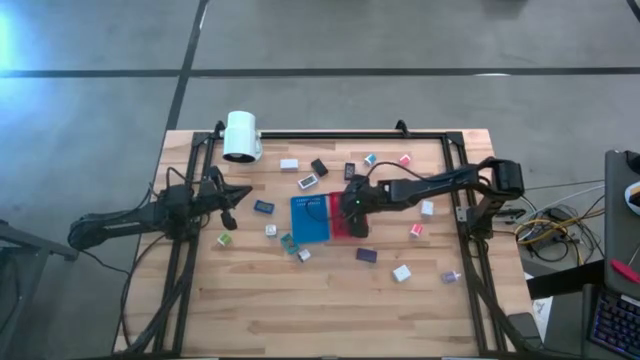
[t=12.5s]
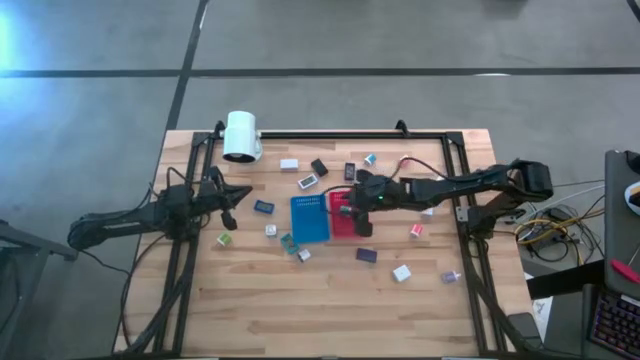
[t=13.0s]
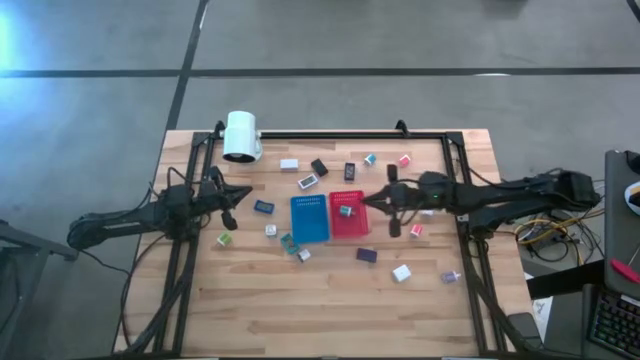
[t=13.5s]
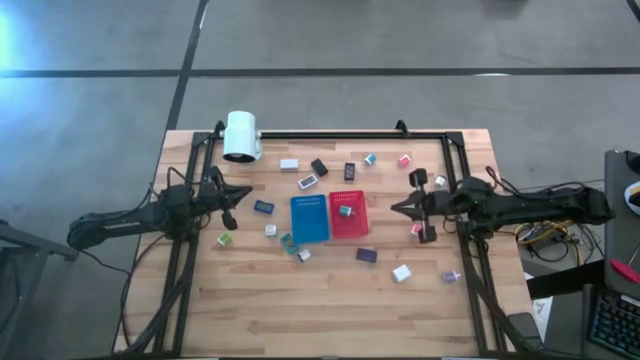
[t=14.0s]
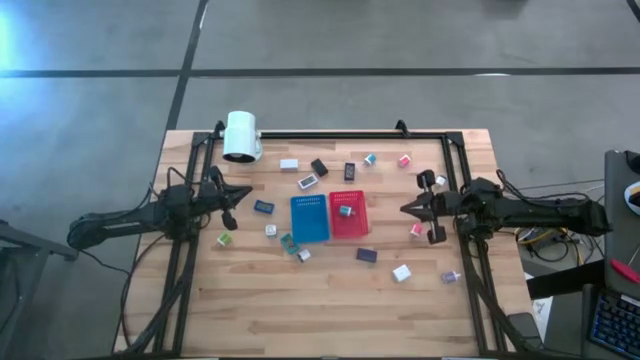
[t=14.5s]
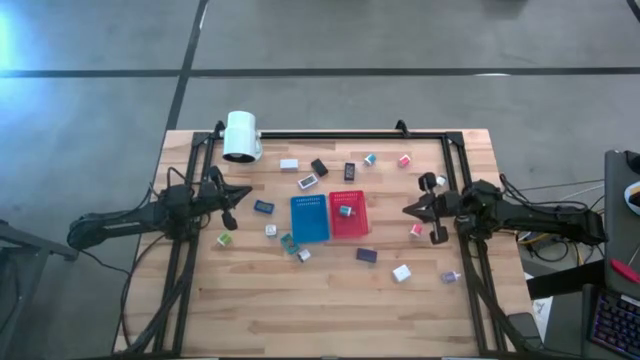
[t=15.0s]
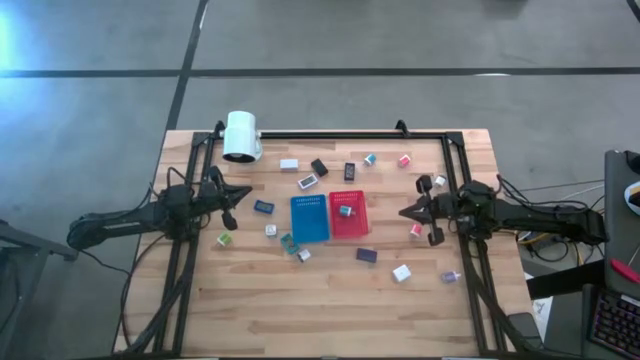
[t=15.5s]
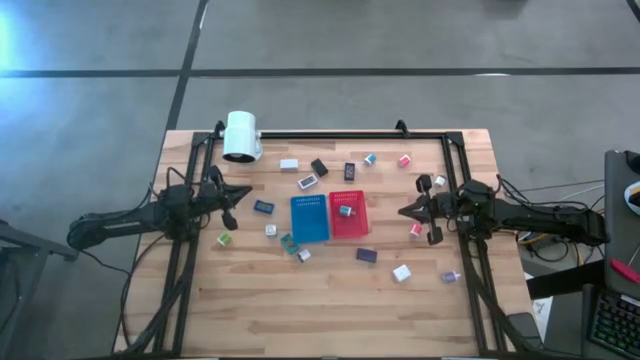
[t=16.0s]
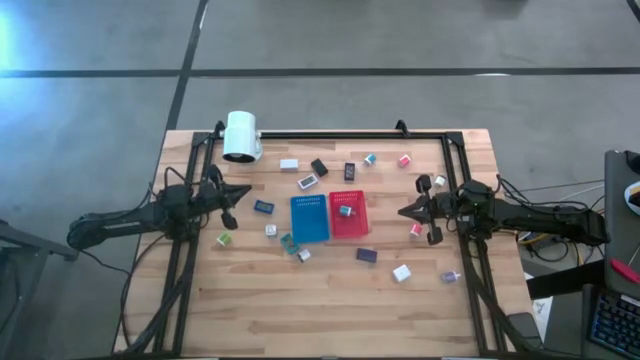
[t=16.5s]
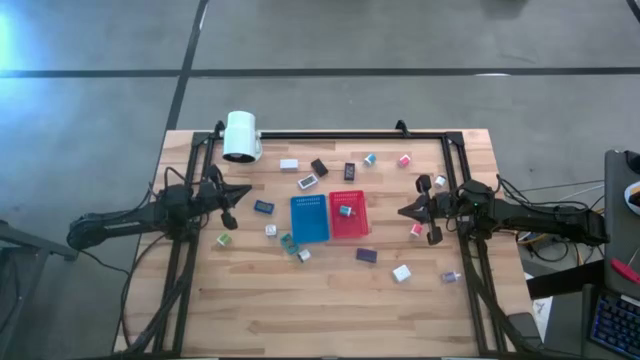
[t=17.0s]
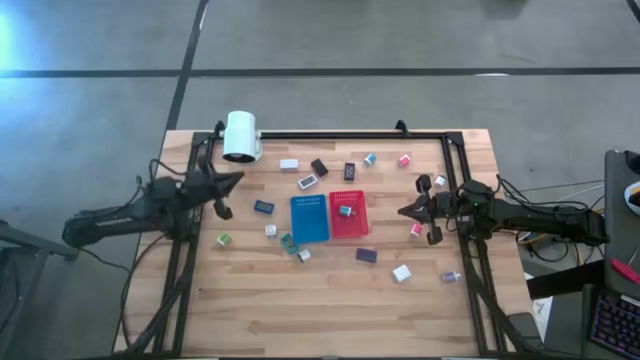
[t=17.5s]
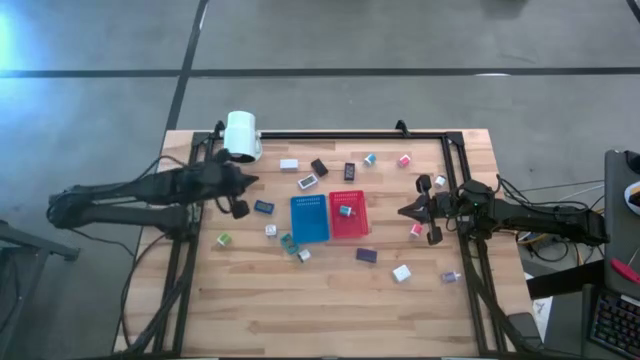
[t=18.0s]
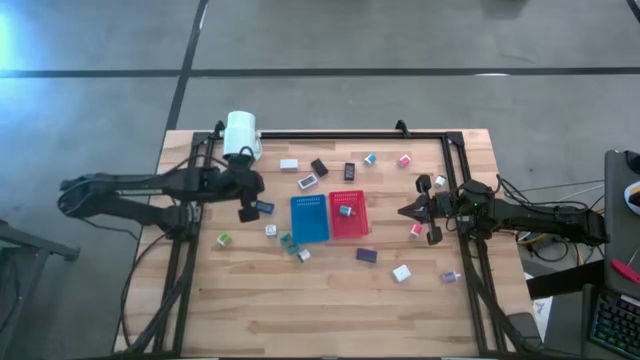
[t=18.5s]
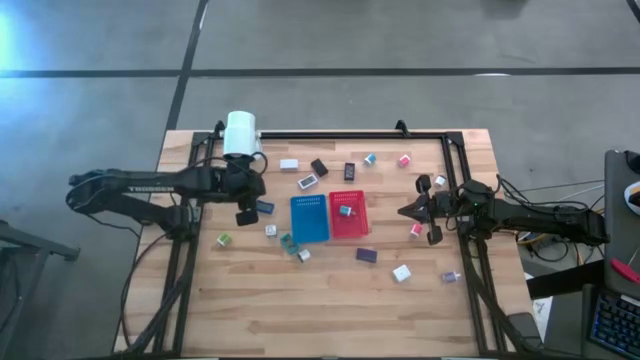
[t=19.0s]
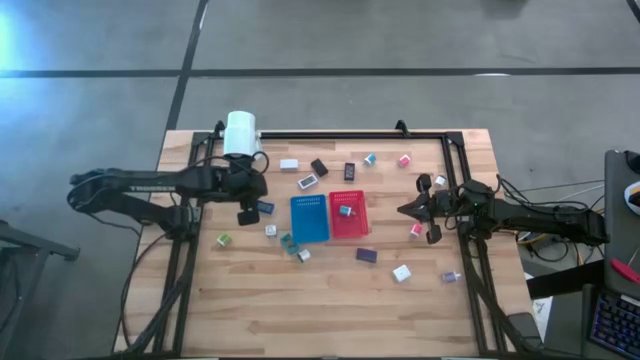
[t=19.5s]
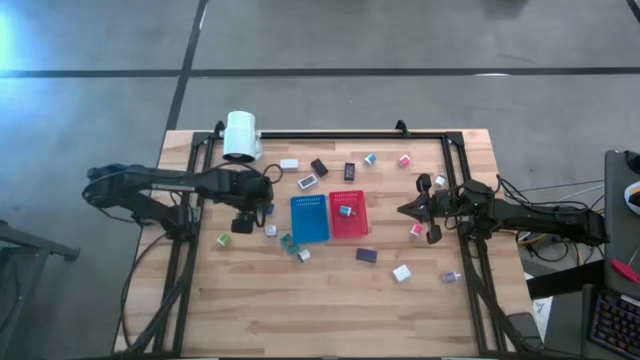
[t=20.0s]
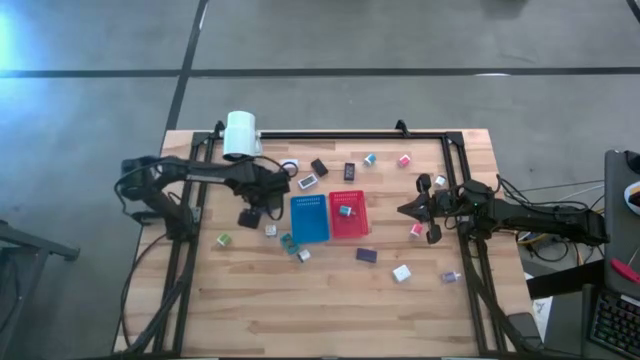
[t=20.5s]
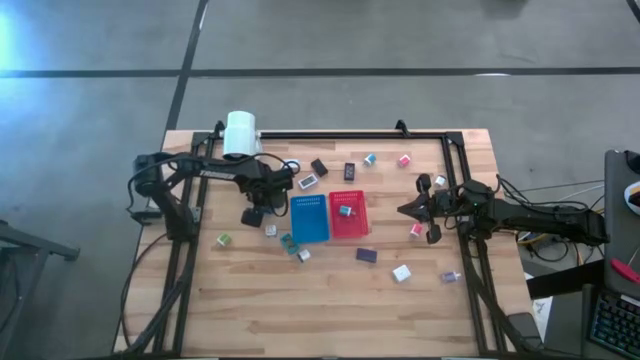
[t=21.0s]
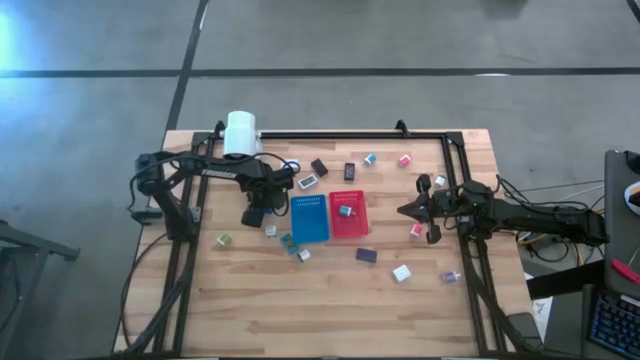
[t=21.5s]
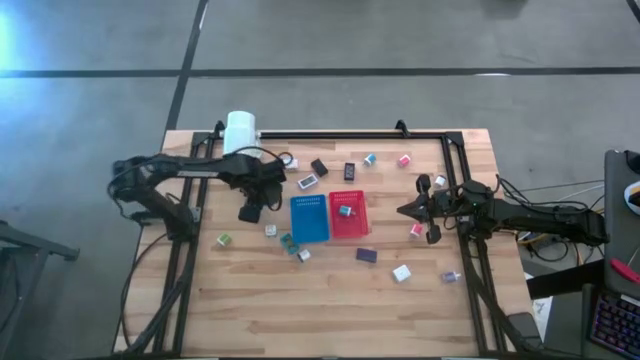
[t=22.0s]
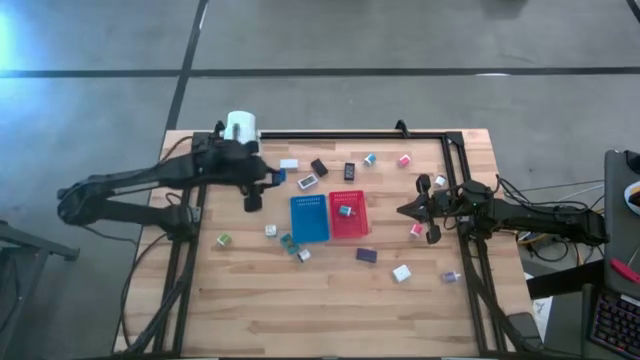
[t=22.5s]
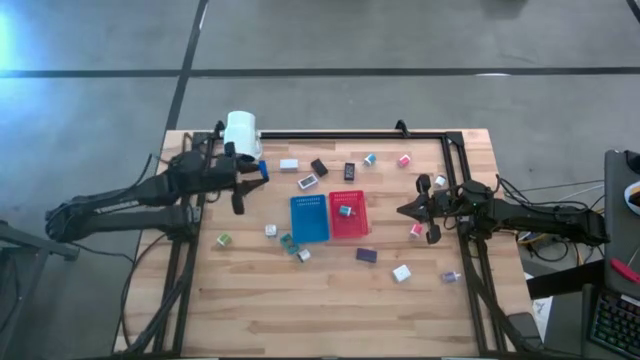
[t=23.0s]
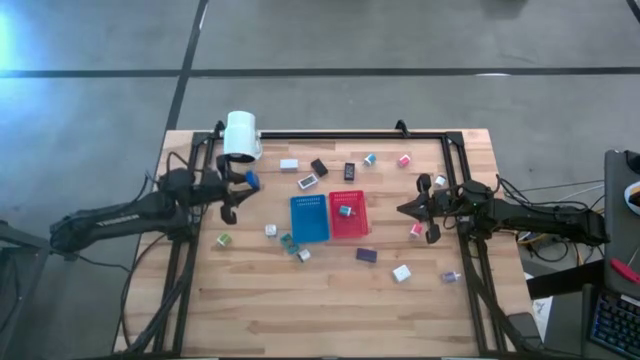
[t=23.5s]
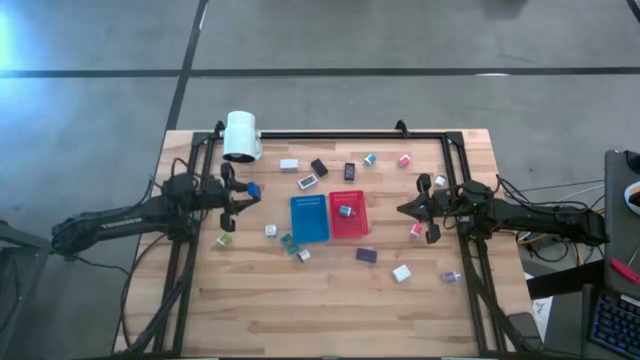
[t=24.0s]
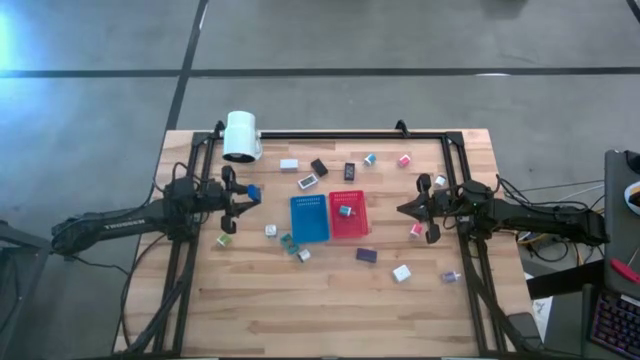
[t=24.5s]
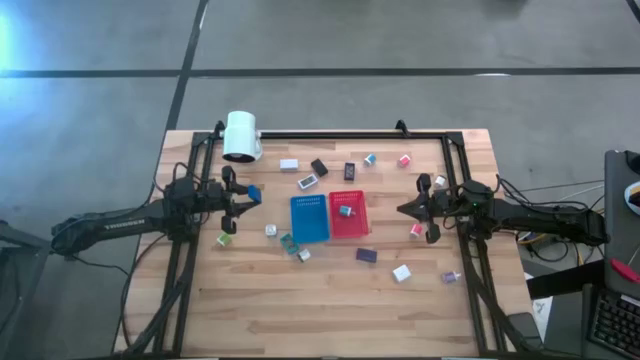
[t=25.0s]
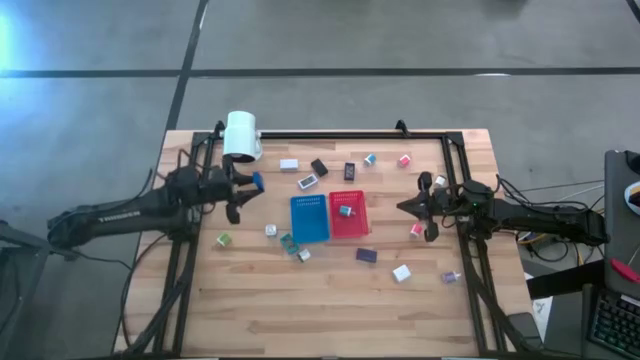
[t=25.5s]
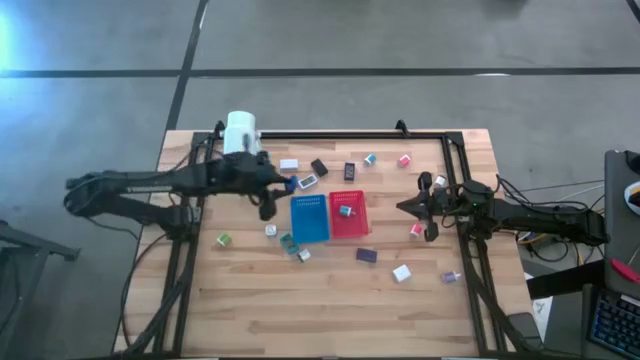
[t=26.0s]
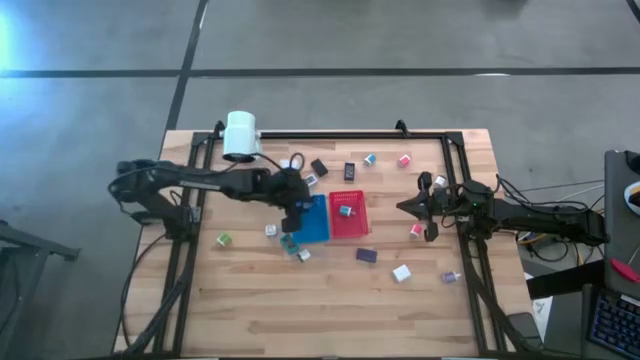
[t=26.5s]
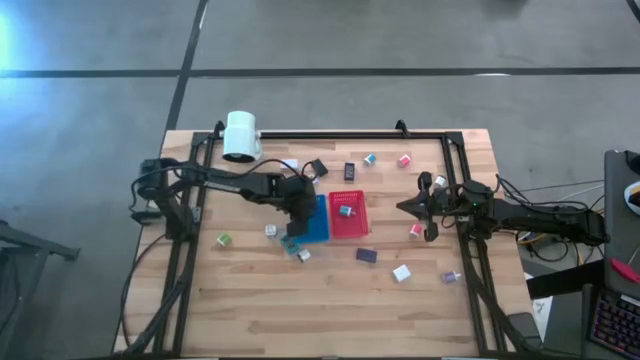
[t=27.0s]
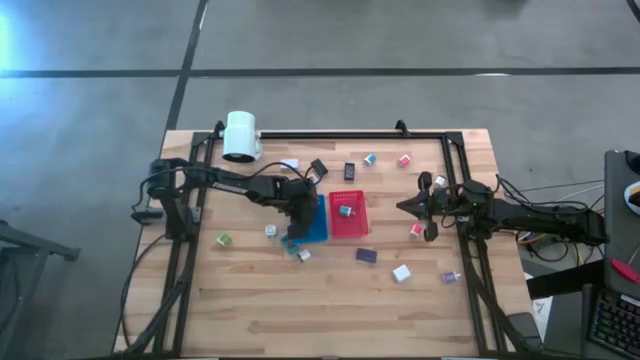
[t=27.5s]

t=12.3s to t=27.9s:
Task: Pick & Place Office items
Put the dark blue digital clock into the blue bin

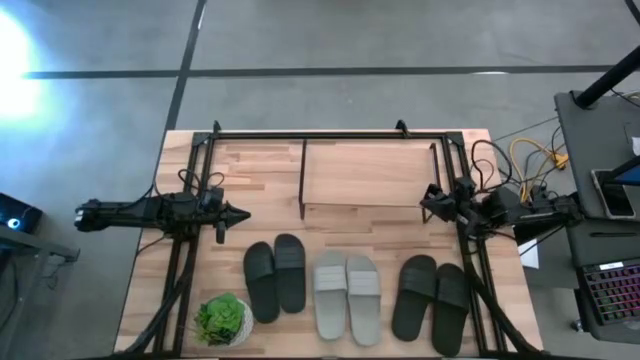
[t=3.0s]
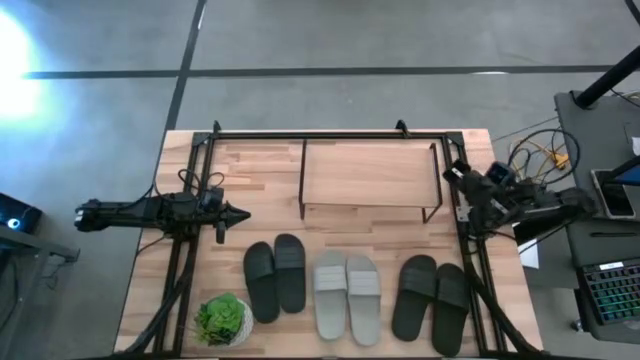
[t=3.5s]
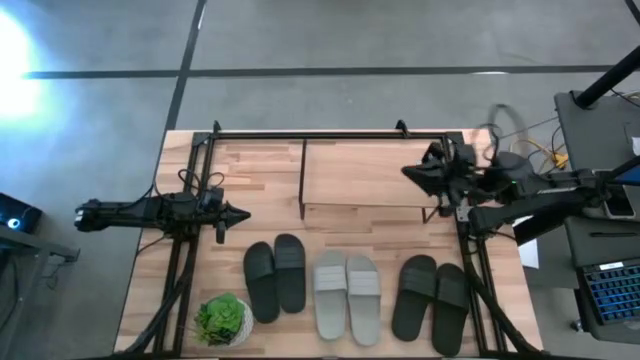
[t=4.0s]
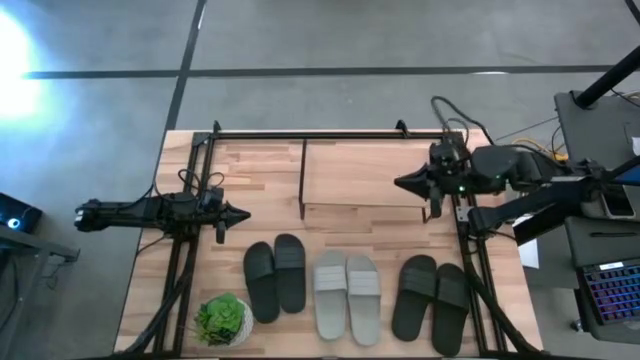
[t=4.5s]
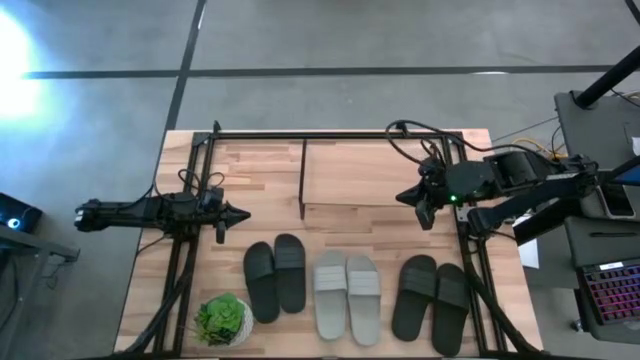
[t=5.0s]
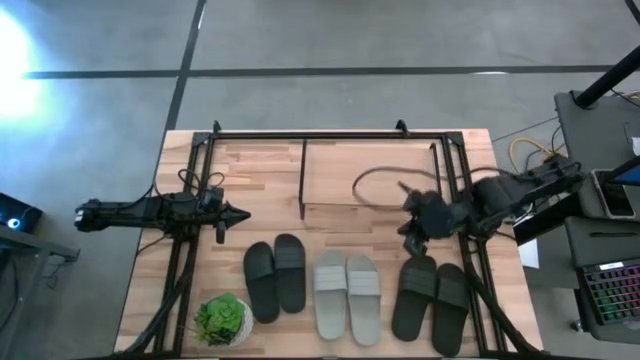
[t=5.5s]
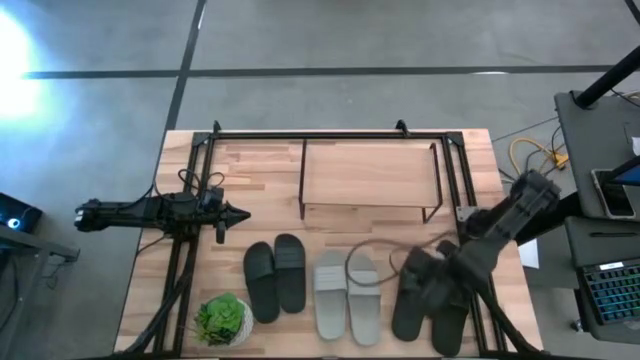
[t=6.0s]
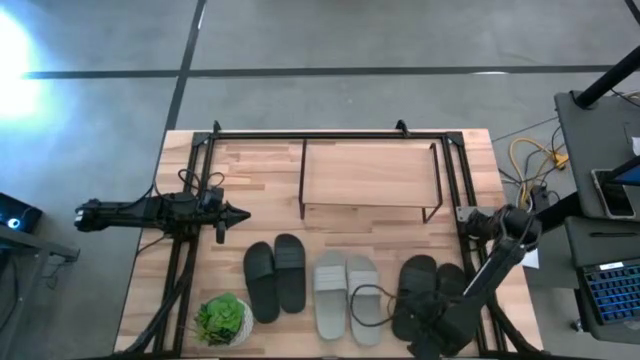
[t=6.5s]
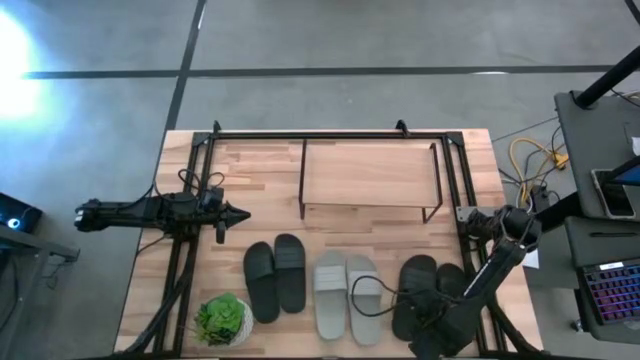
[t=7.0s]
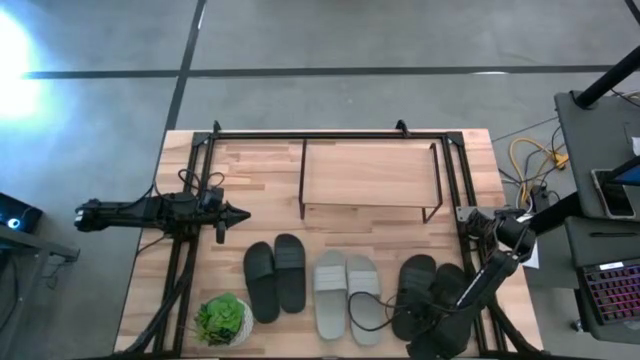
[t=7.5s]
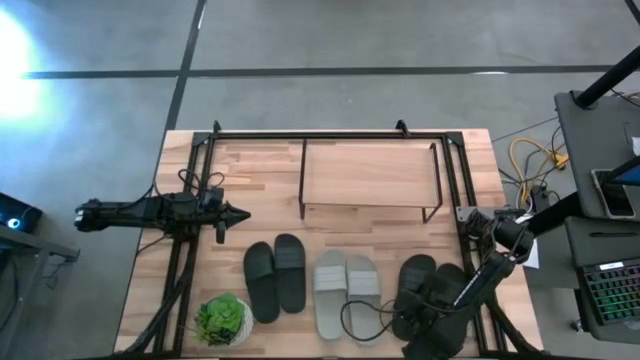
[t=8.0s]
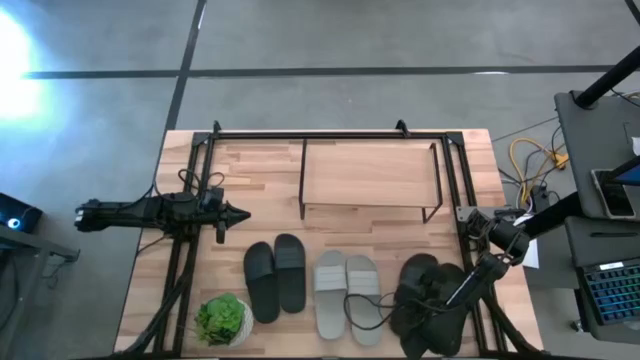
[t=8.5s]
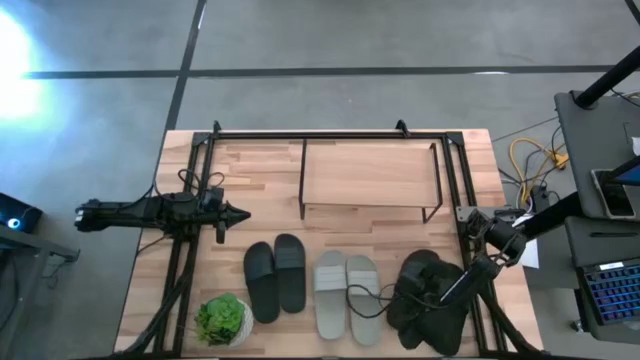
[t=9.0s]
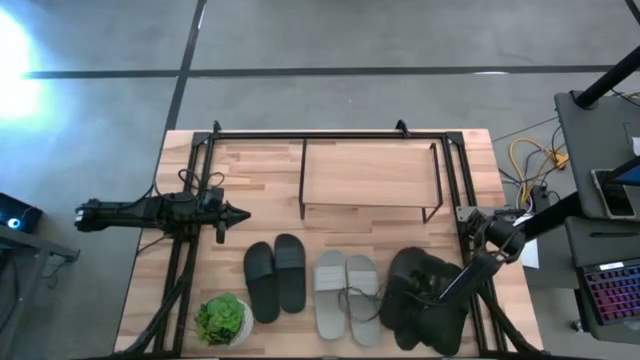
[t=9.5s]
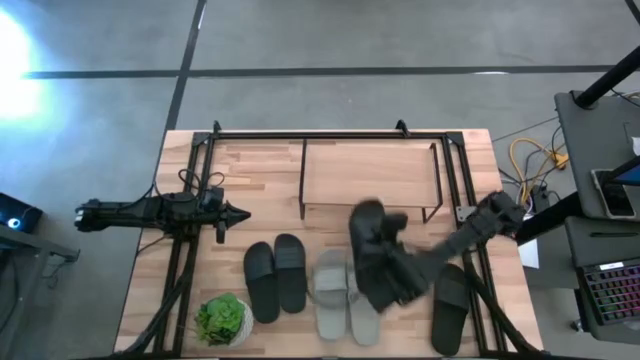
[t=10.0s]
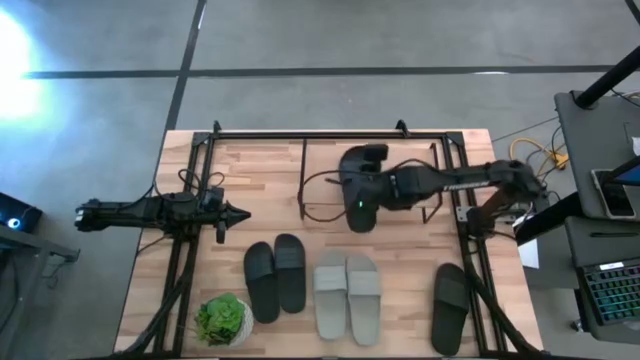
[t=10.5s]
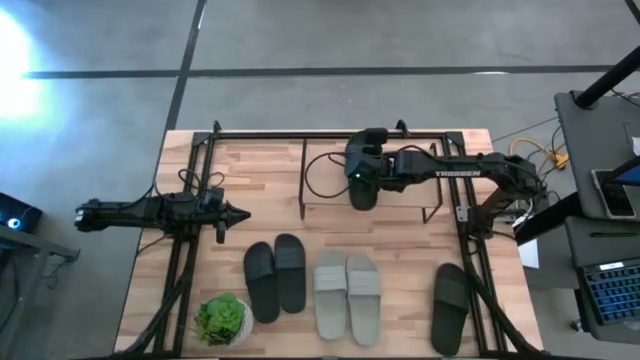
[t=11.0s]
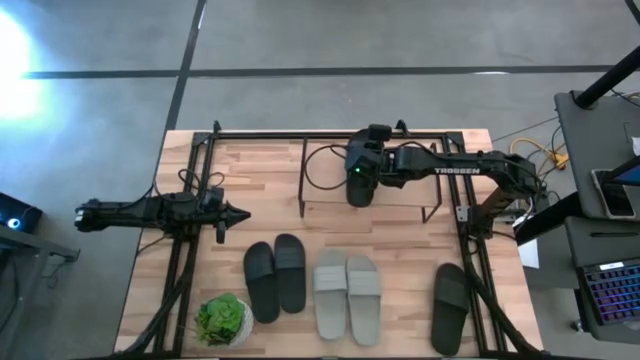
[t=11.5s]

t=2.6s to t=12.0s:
Task: Pick and place slides into the shelf
Put the black slide from the rightmost pair on the shelf
